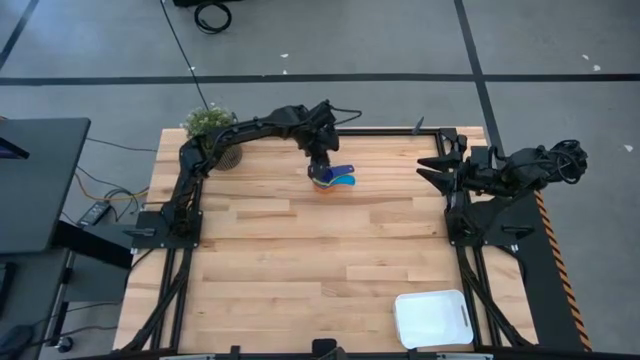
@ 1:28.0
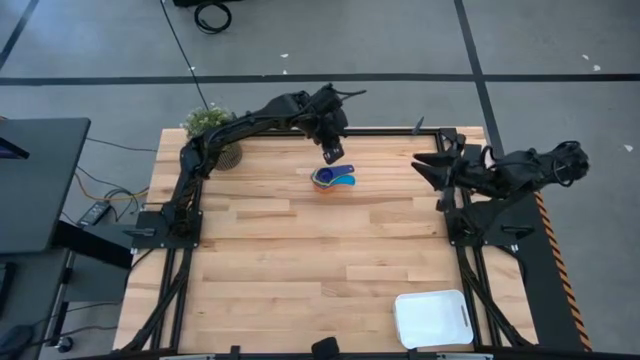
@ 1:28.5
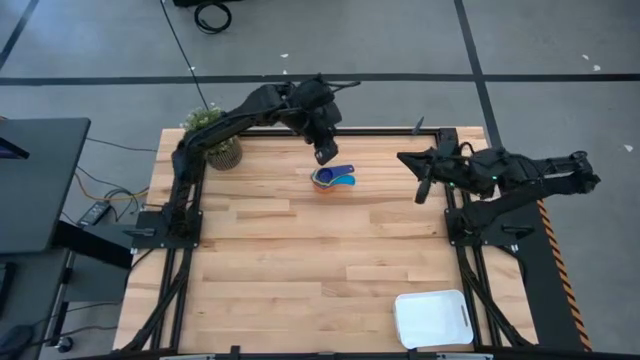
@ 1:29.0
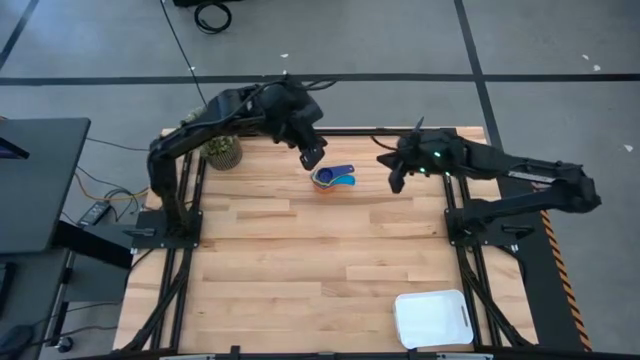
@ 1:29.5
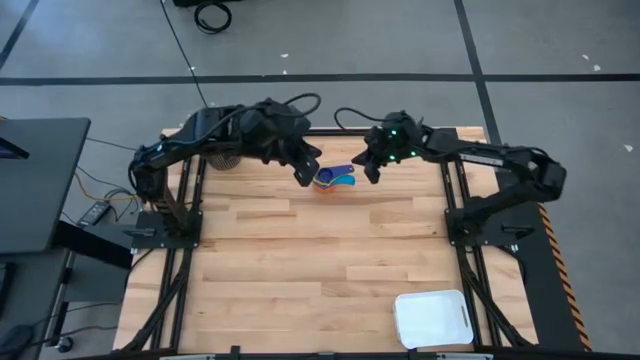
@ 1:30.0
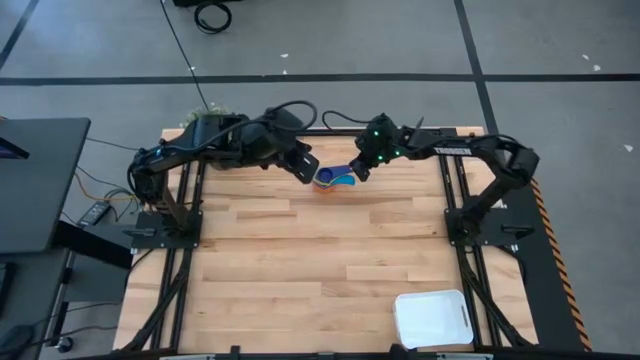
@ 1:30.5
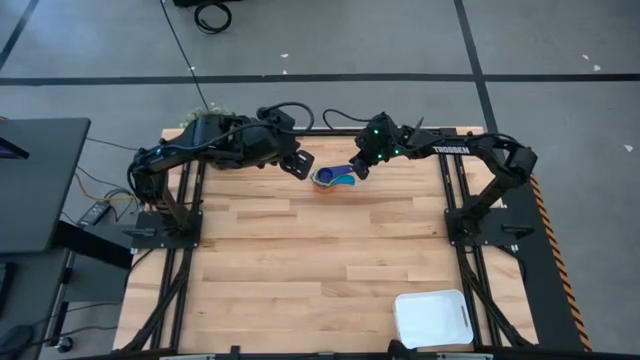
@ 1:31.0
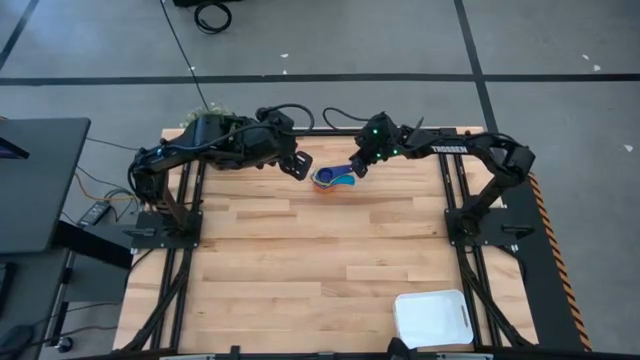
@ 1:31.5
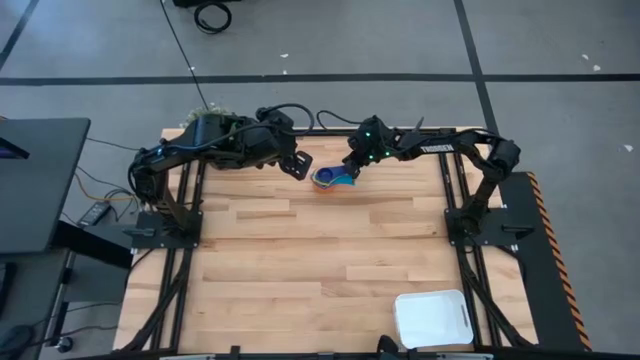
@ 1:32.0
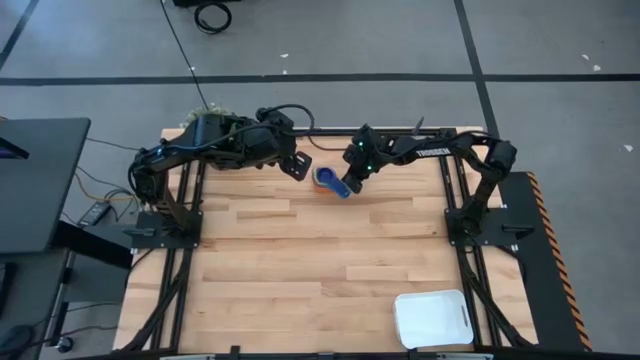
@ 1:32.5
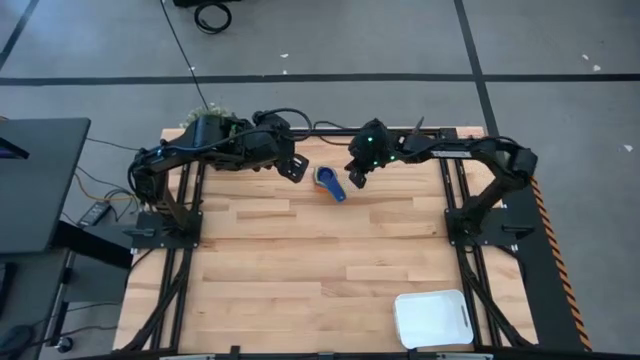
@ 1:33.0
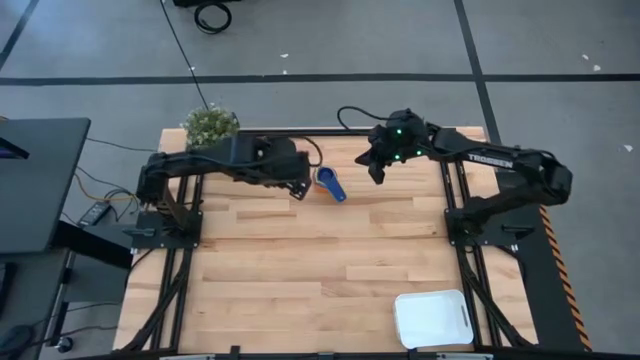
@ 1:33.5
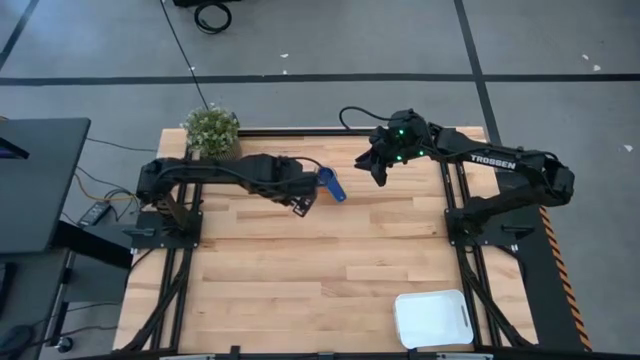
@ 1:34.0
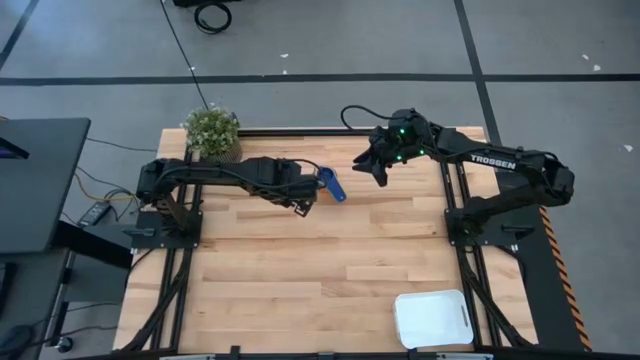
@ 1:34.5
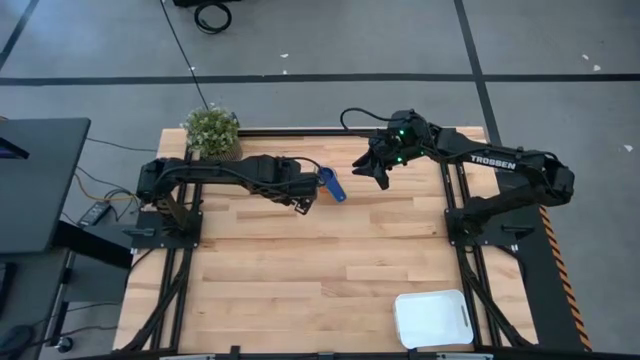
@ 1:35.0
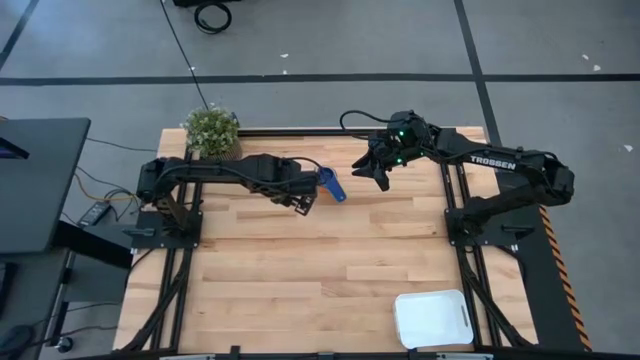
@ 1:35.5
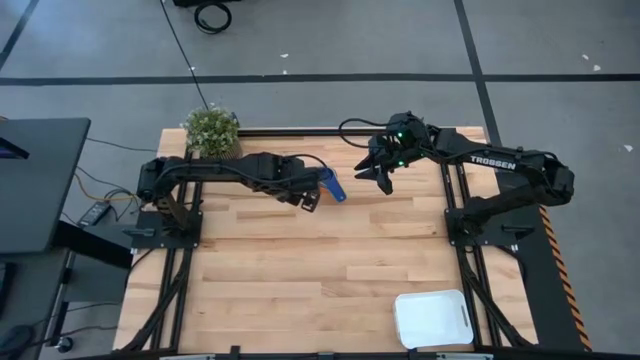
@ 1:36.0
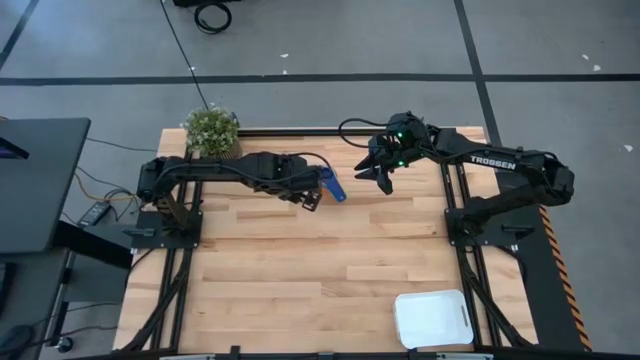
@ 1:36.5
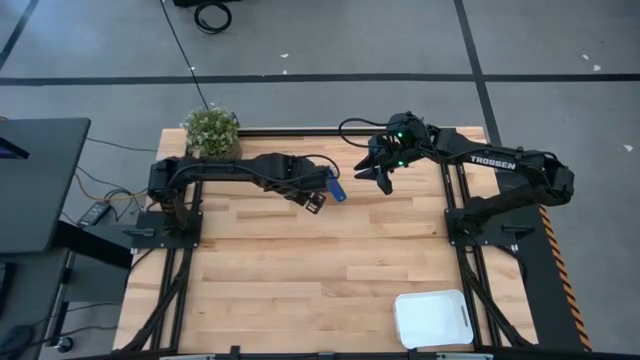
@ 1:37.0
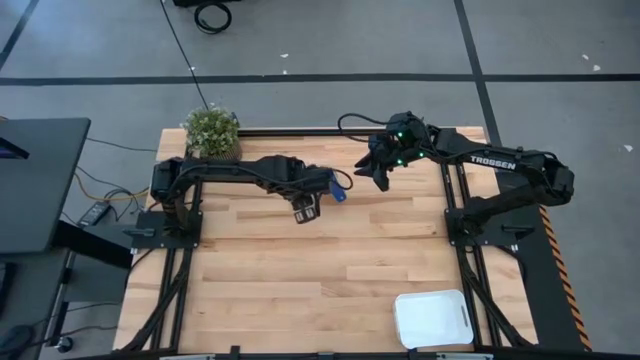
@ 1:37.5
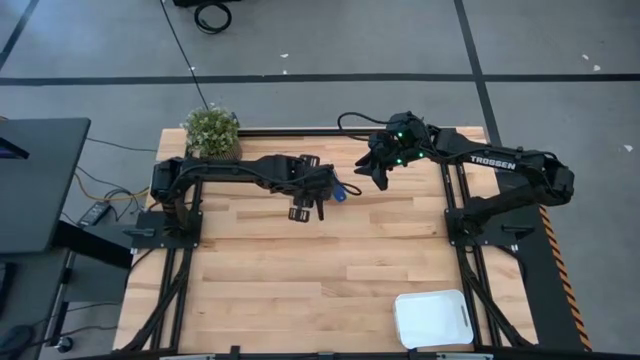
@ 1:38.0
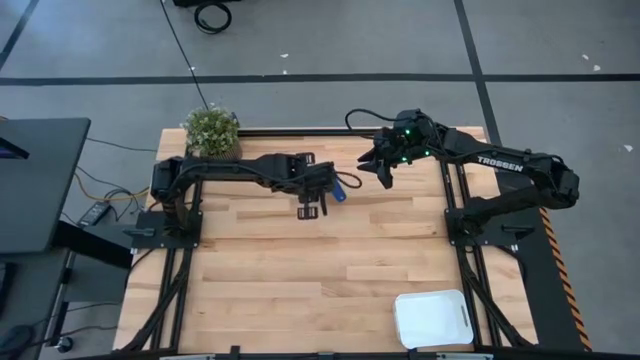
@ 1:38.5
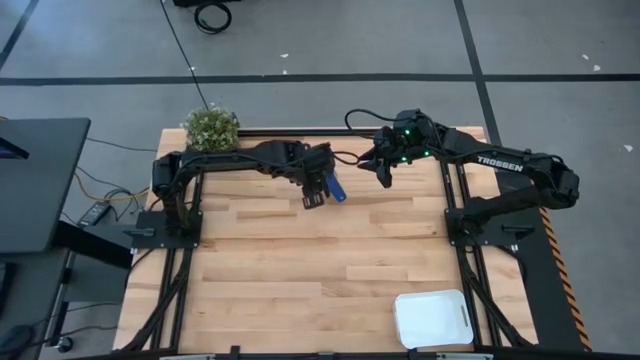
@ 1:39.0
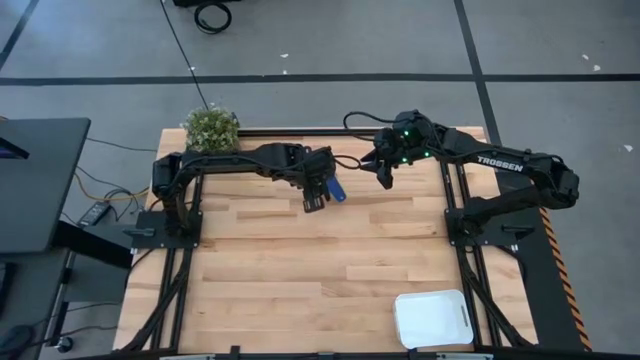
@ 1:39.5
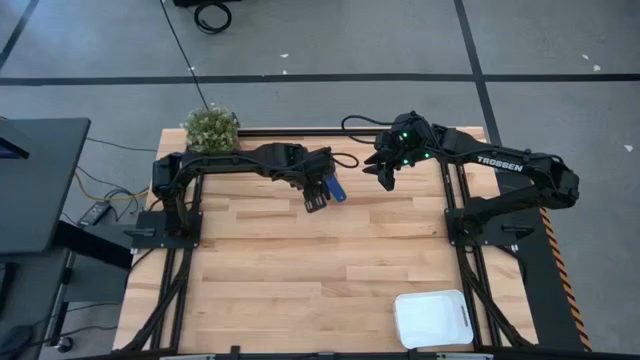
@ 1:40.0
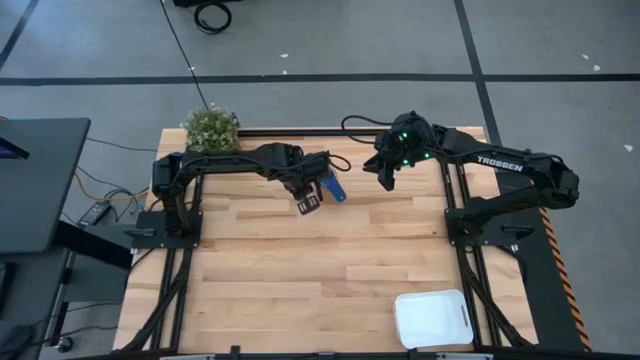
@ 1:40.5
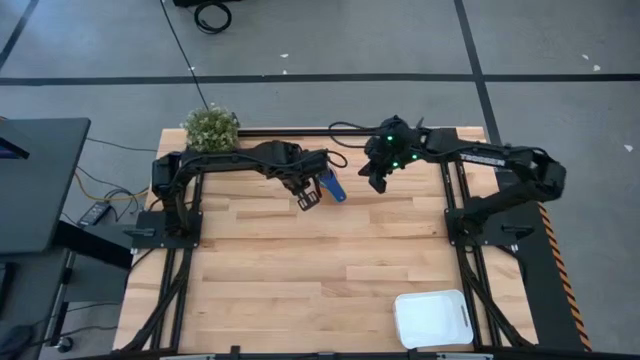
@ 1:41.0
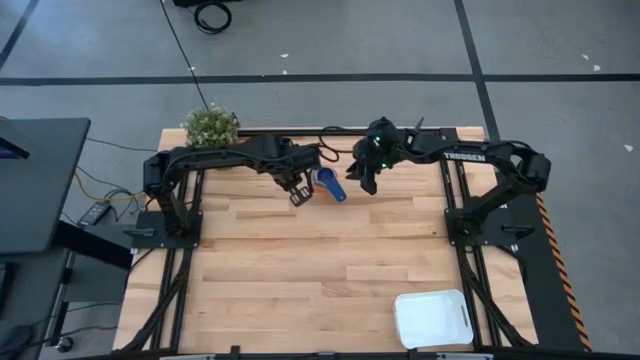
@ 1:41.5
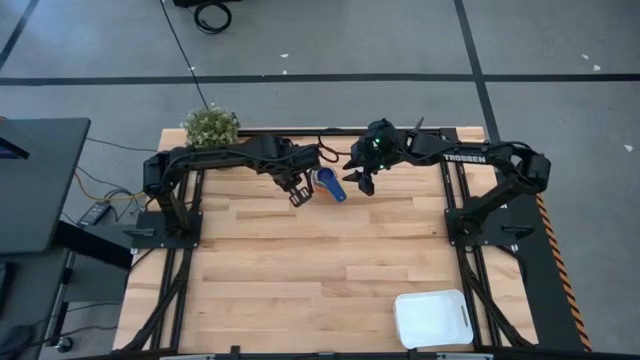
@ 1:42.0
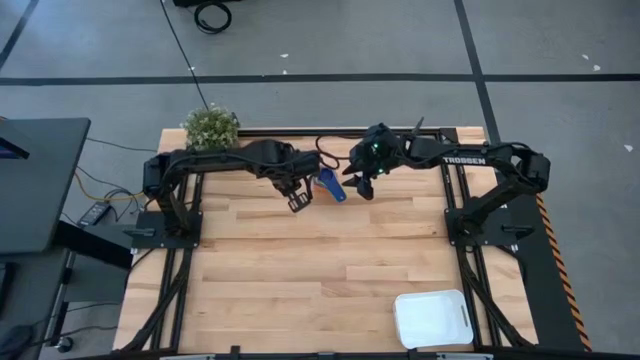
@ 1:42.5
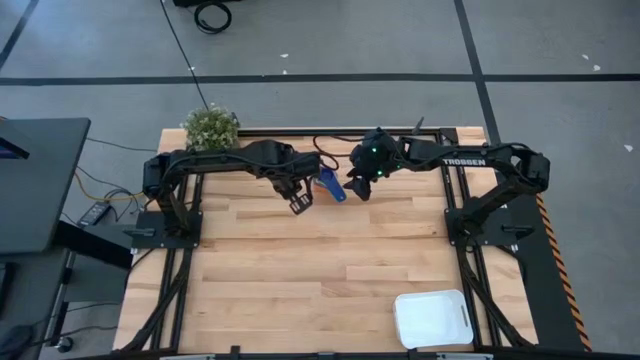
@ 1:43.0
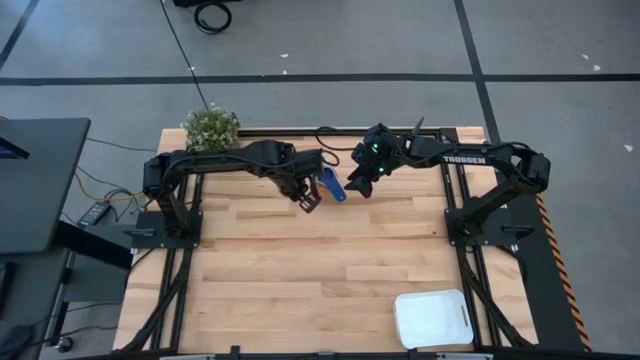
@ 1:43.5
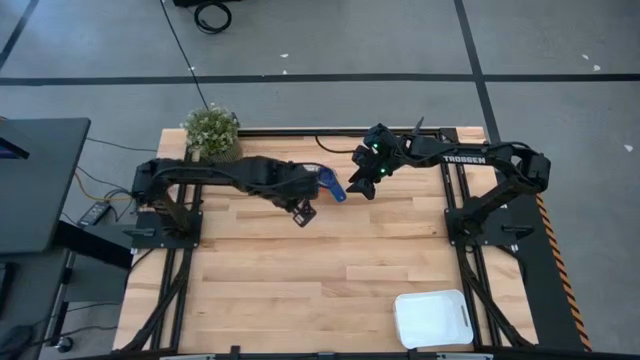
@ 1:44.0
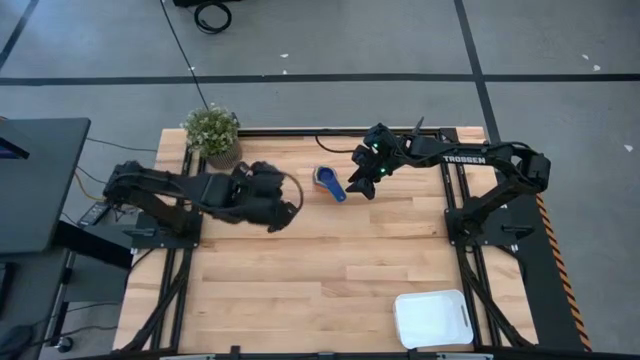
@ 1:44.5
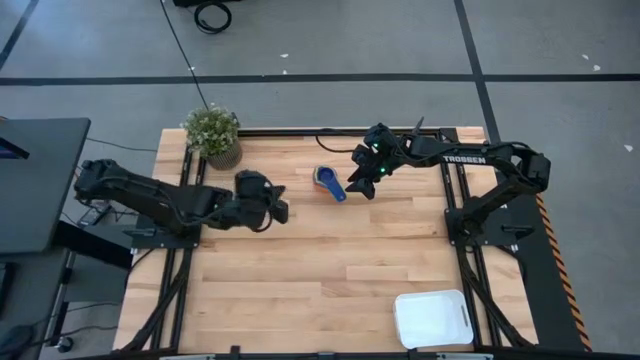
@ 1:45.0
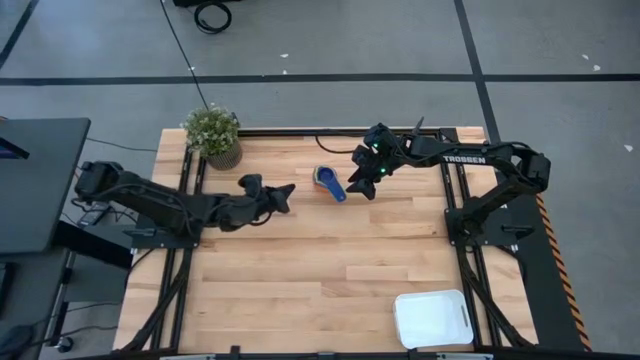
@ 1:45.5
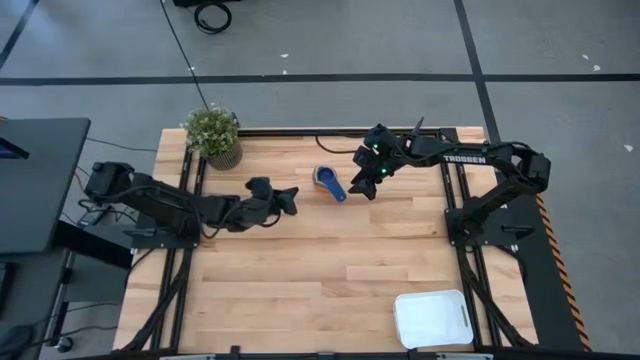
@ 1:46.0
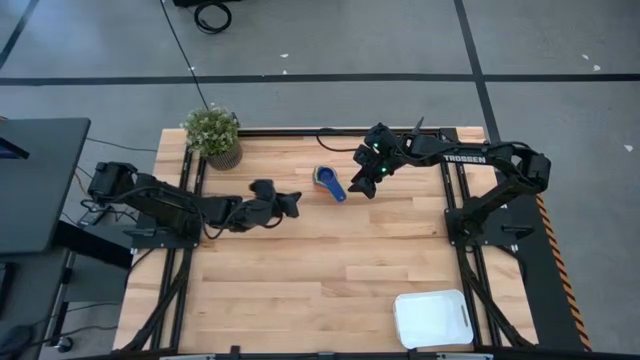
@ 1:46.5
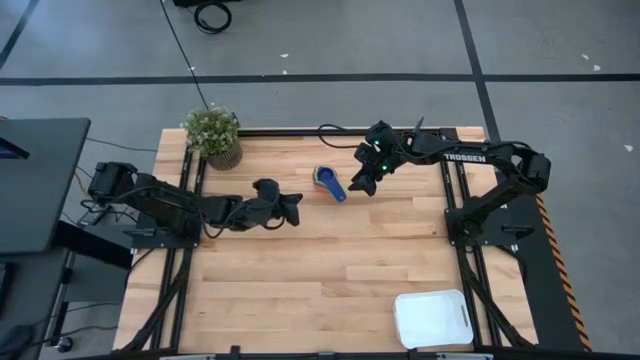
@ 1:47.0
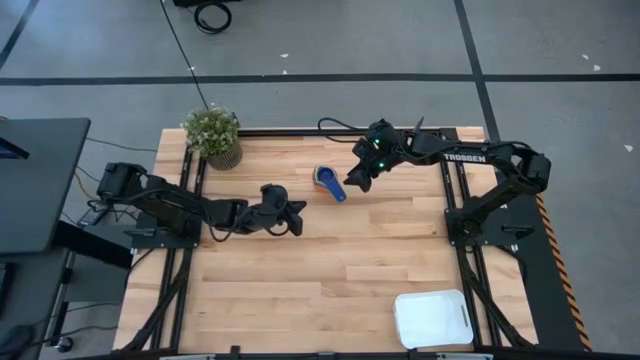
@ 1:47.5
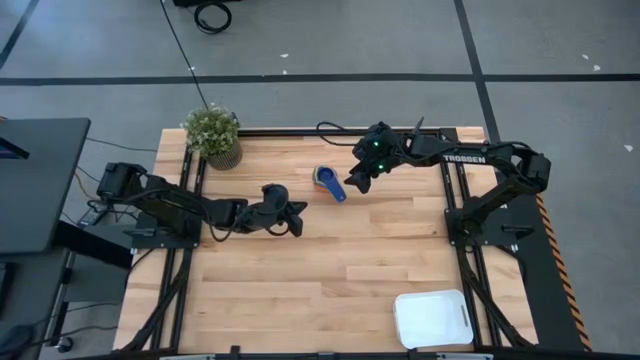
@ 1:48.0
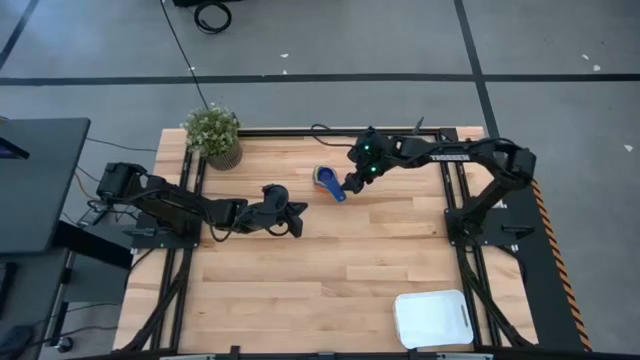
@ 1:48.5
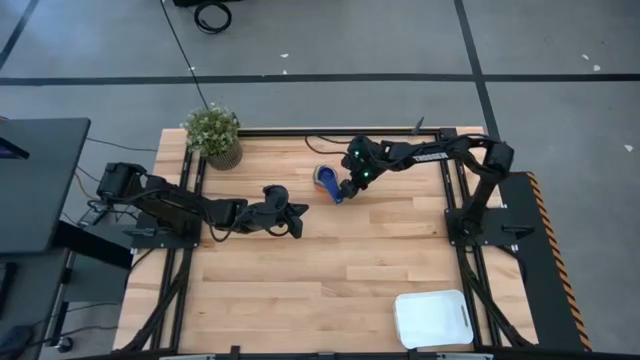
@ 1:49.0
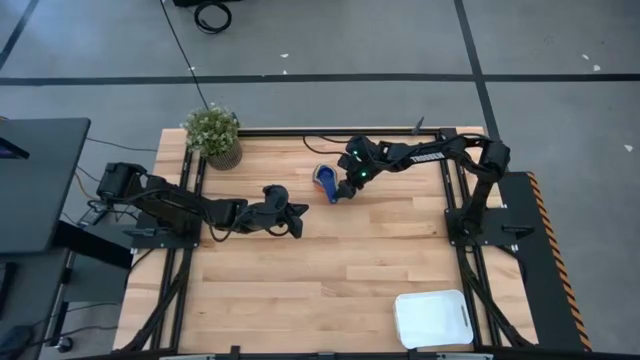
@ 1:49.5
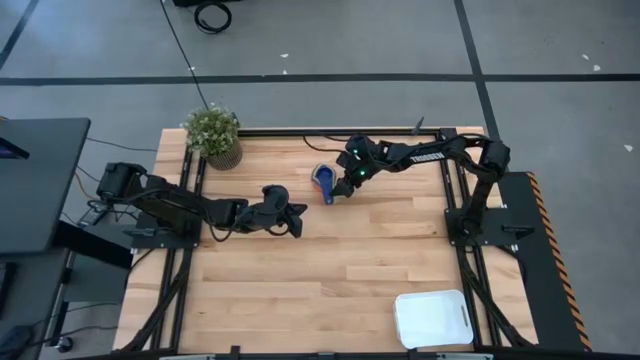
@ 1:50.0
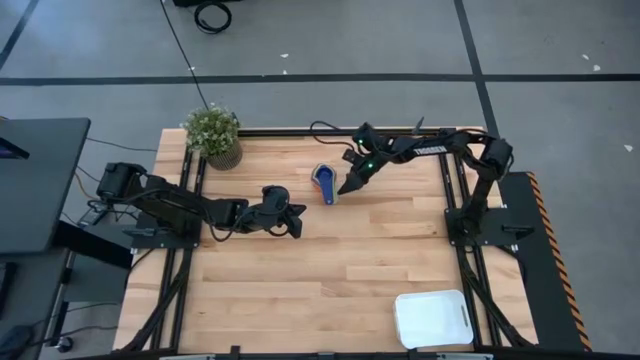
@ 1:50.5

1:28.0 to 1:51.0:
Task: Nest measuring cups in basket
Put the stacked measuring cups into the white bin
